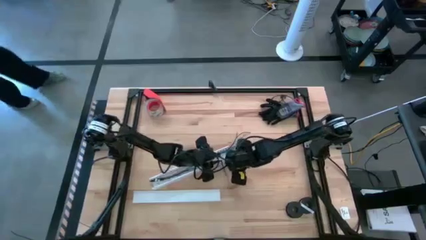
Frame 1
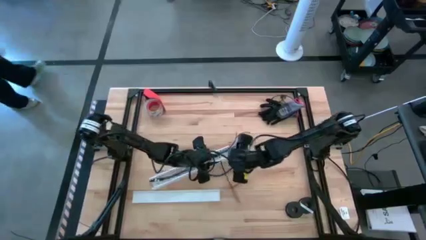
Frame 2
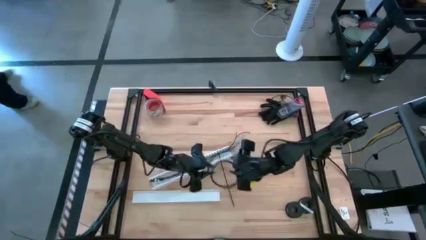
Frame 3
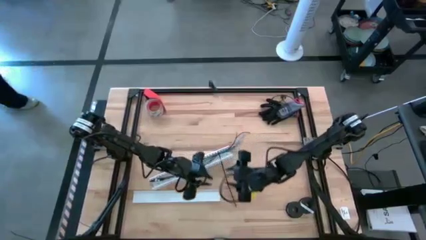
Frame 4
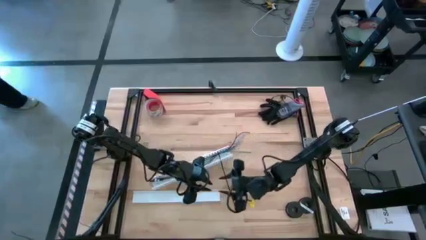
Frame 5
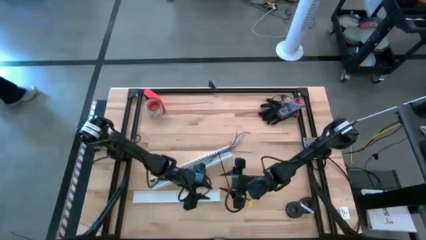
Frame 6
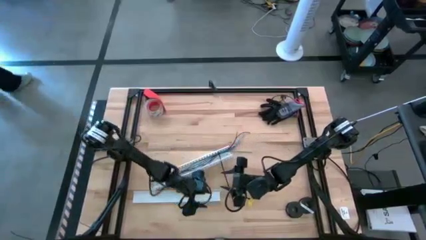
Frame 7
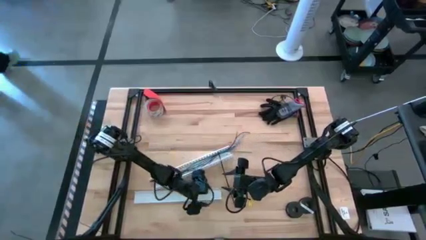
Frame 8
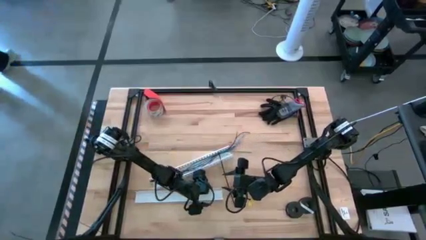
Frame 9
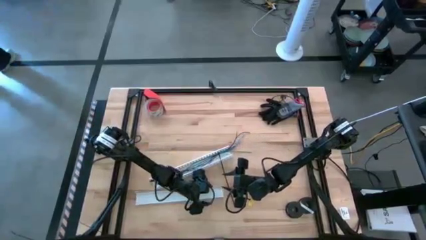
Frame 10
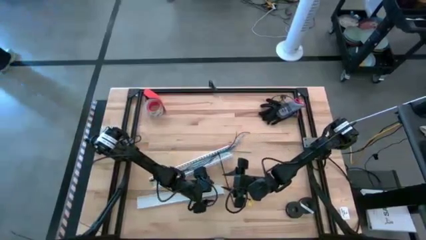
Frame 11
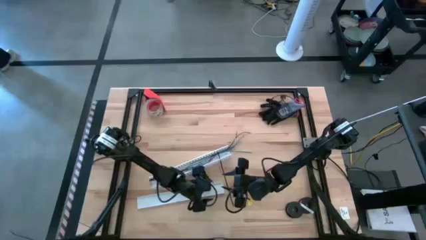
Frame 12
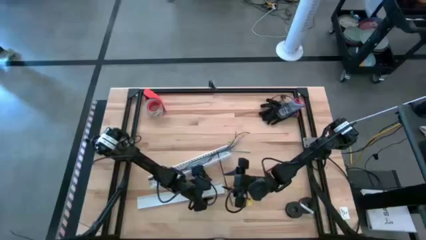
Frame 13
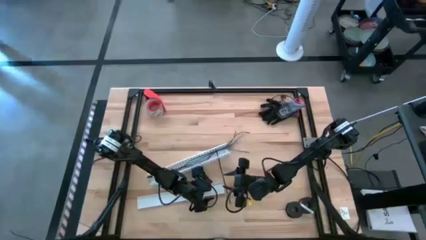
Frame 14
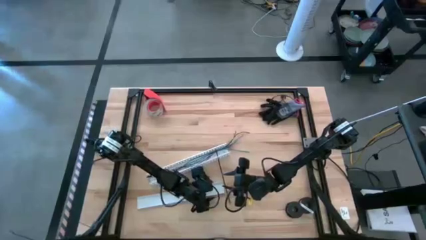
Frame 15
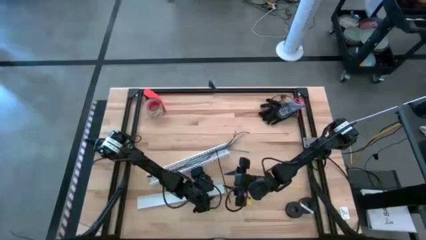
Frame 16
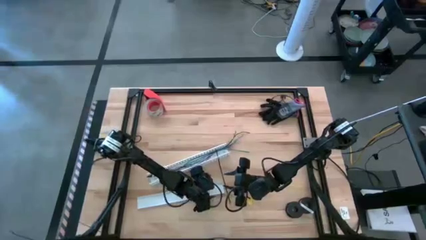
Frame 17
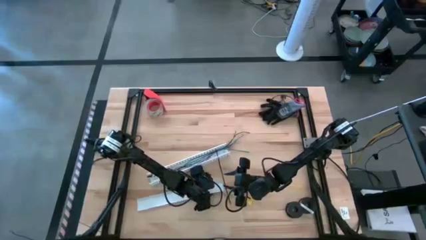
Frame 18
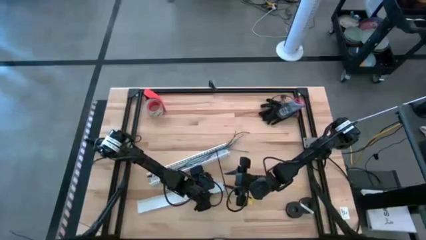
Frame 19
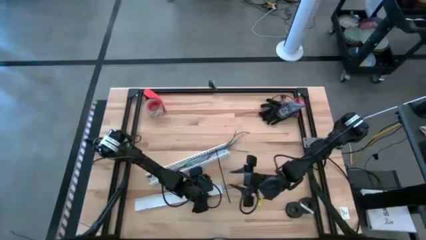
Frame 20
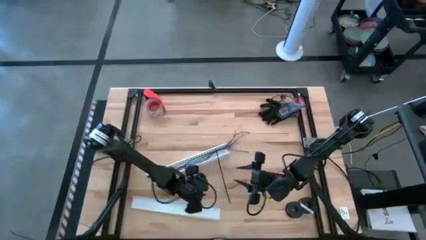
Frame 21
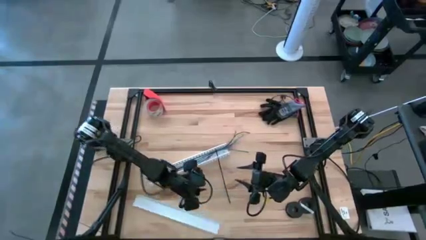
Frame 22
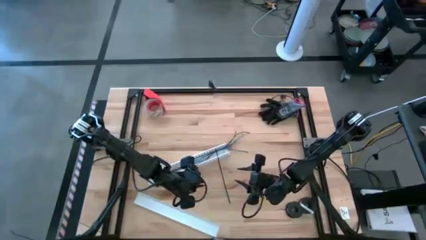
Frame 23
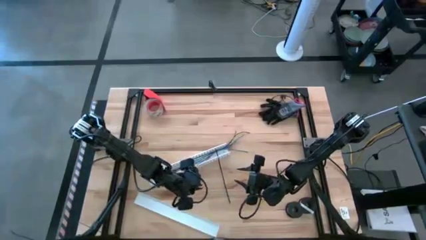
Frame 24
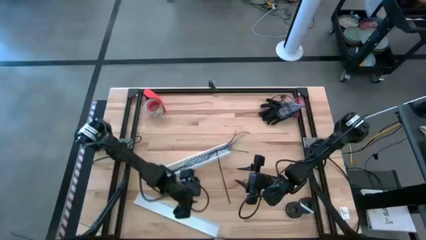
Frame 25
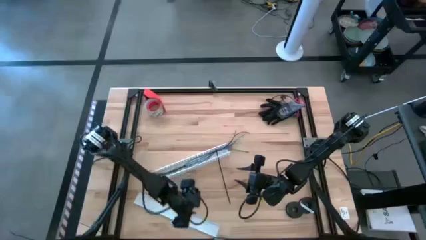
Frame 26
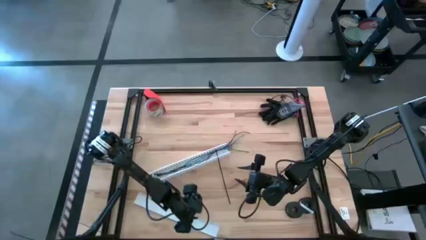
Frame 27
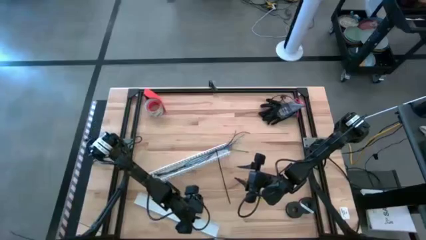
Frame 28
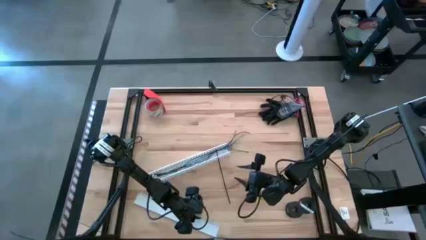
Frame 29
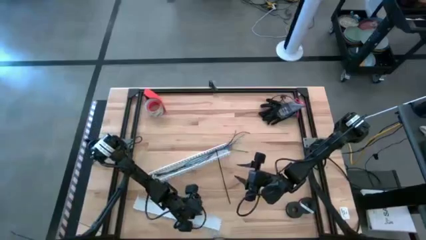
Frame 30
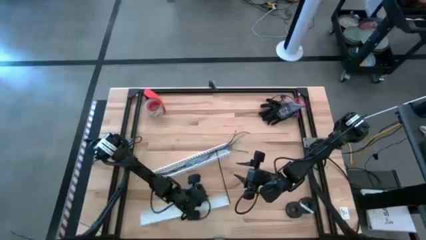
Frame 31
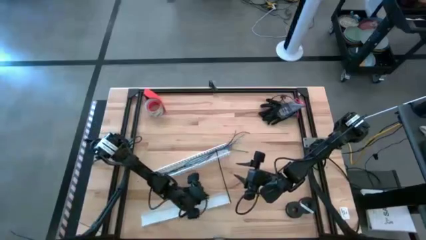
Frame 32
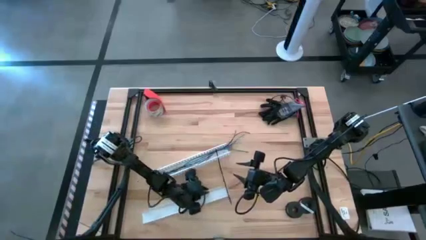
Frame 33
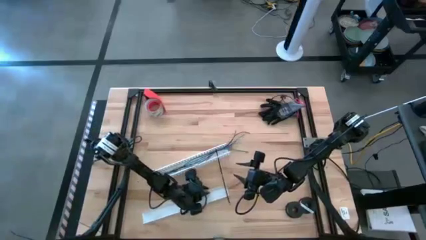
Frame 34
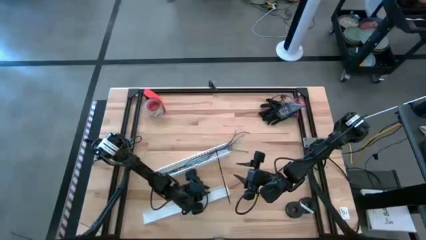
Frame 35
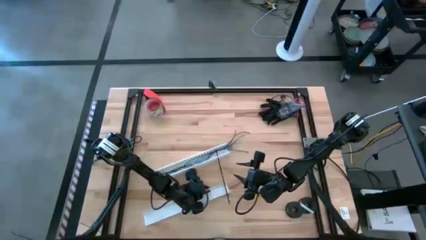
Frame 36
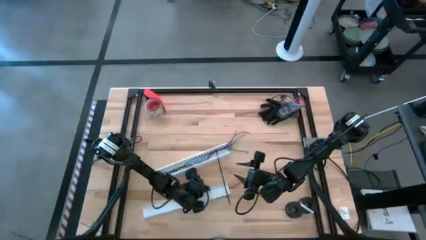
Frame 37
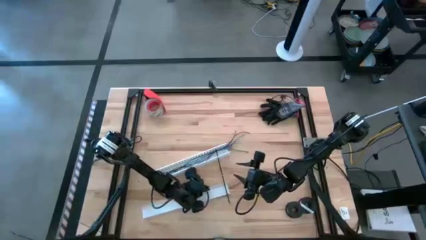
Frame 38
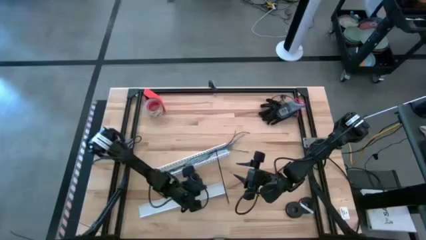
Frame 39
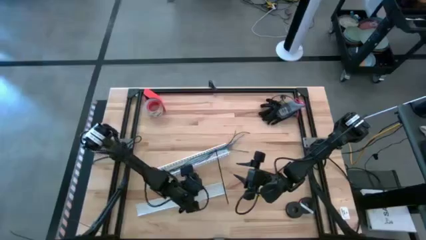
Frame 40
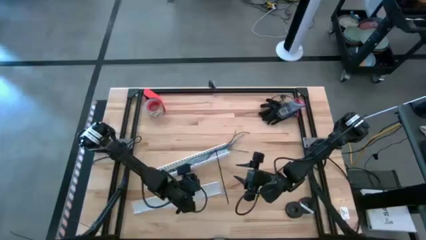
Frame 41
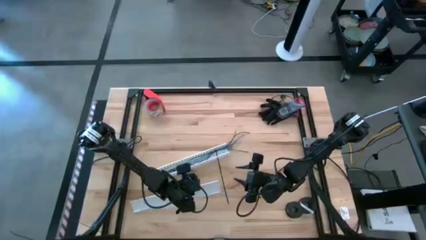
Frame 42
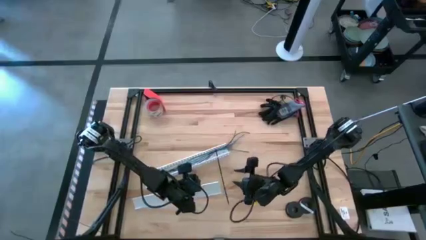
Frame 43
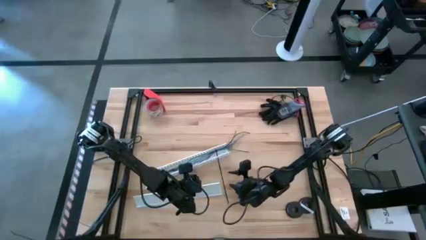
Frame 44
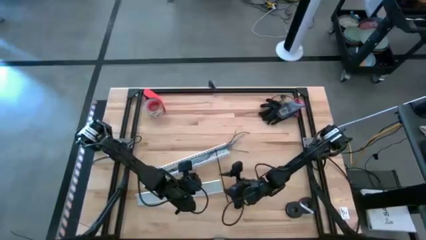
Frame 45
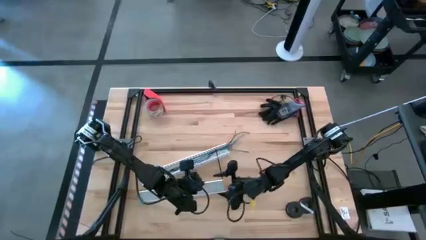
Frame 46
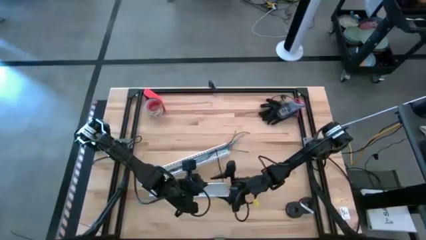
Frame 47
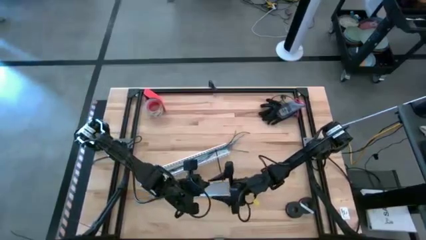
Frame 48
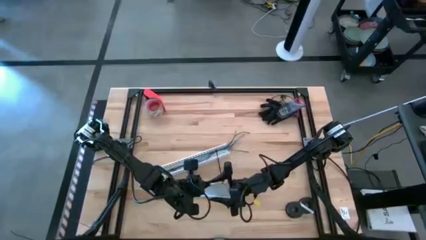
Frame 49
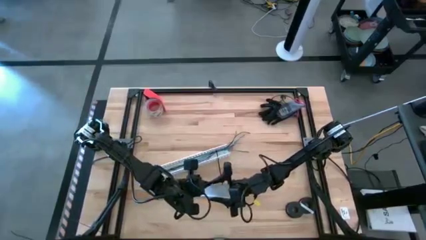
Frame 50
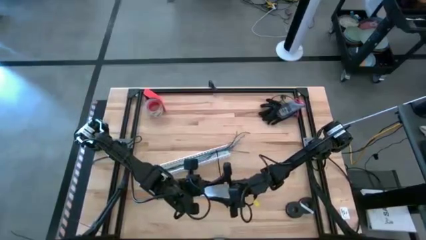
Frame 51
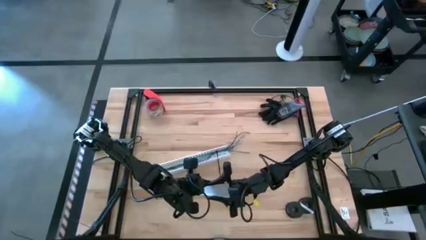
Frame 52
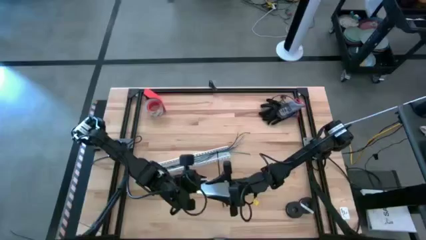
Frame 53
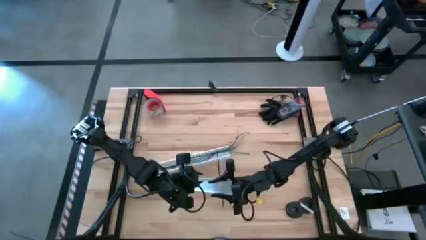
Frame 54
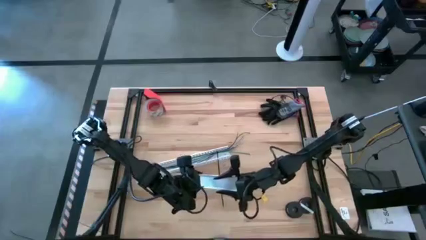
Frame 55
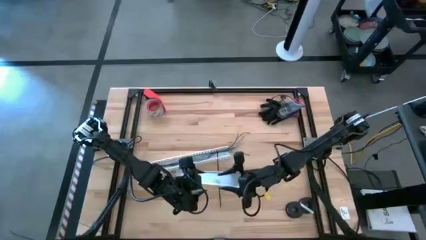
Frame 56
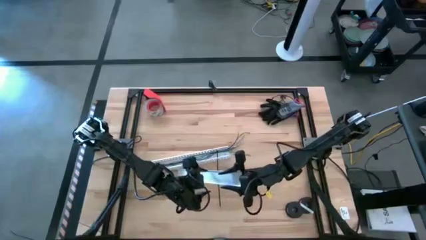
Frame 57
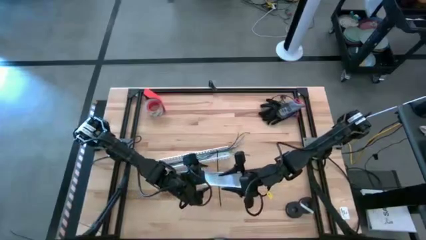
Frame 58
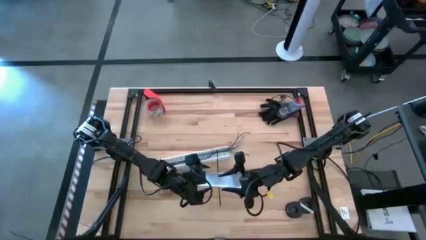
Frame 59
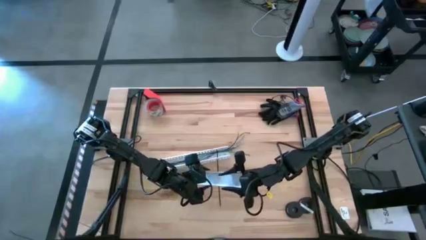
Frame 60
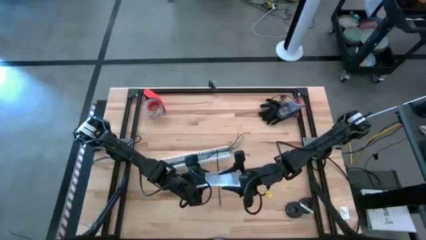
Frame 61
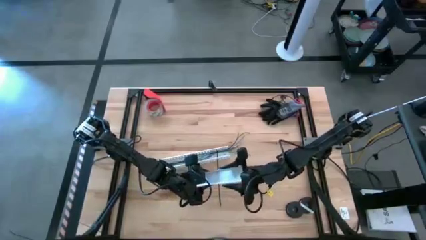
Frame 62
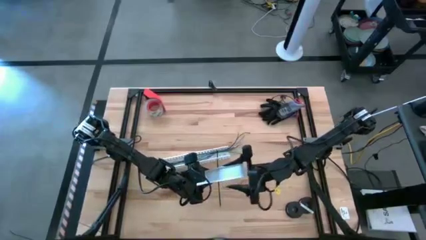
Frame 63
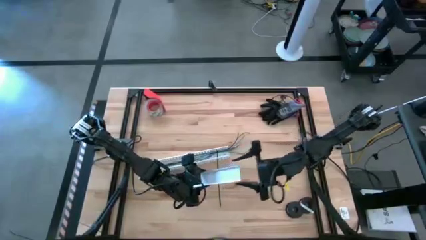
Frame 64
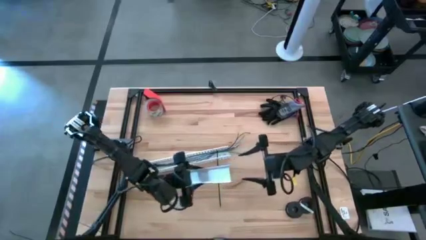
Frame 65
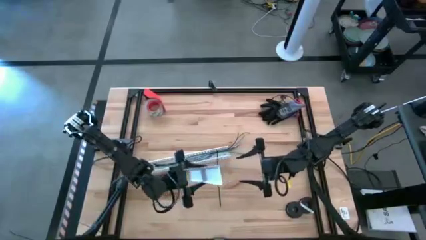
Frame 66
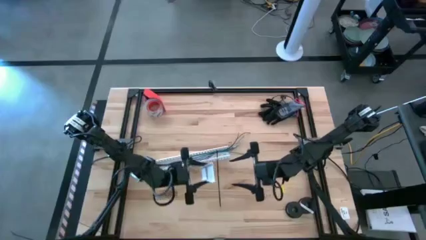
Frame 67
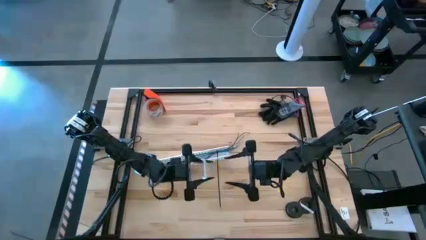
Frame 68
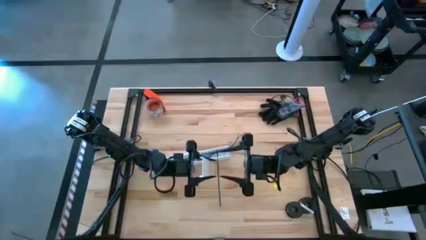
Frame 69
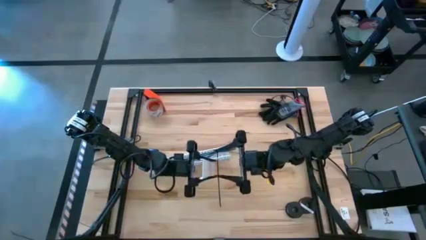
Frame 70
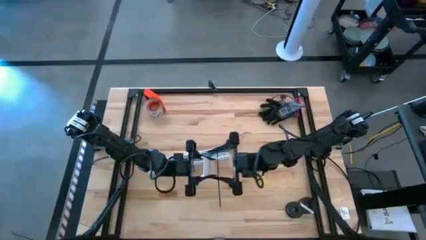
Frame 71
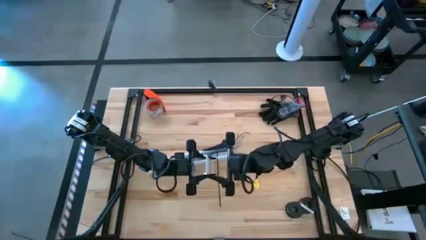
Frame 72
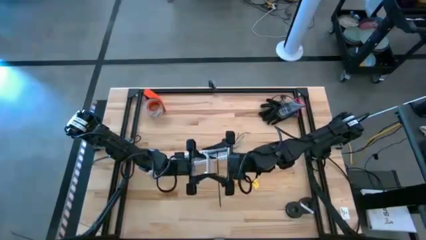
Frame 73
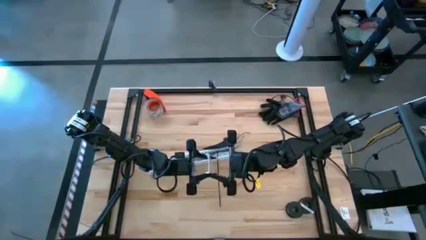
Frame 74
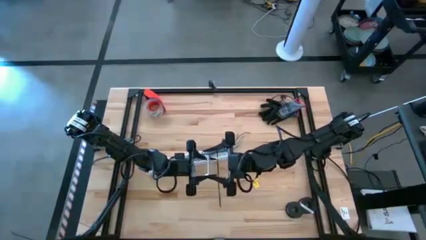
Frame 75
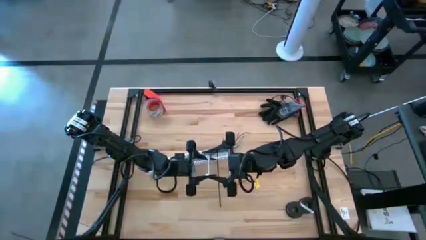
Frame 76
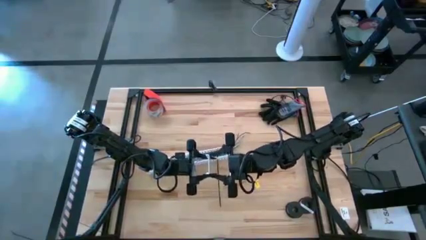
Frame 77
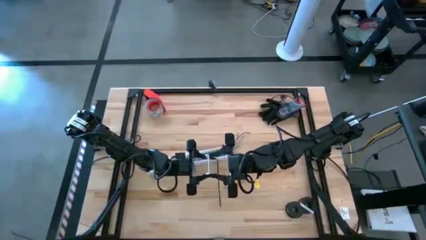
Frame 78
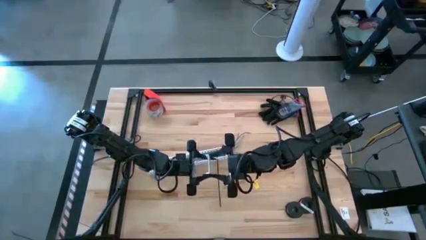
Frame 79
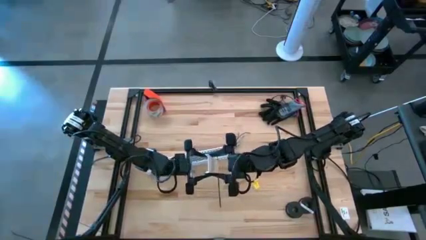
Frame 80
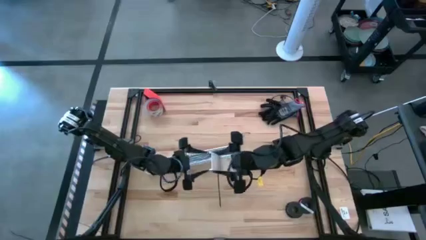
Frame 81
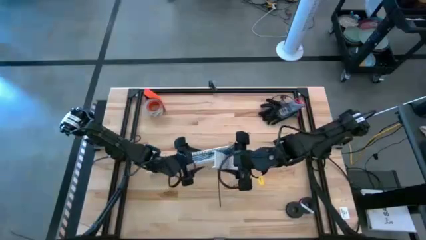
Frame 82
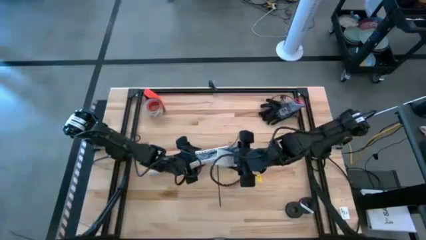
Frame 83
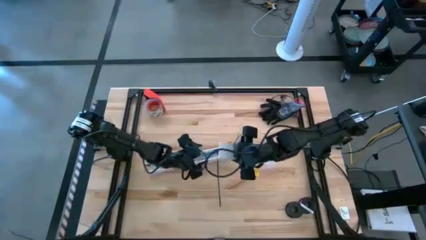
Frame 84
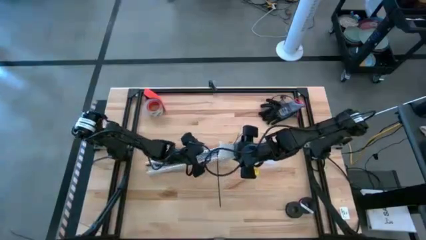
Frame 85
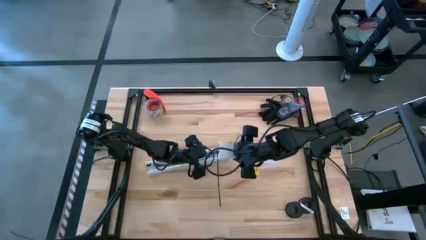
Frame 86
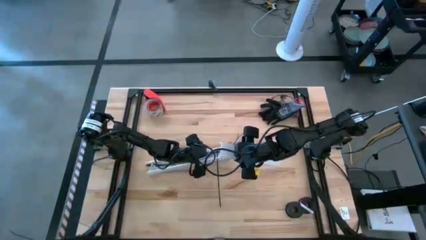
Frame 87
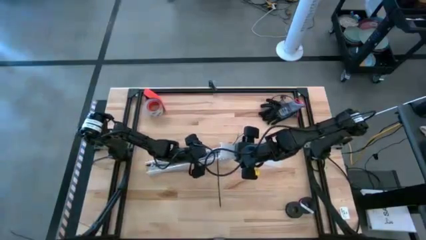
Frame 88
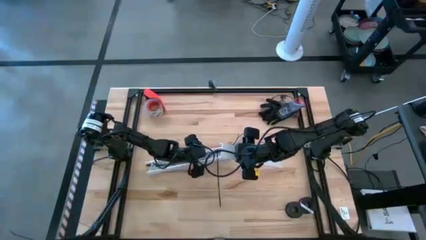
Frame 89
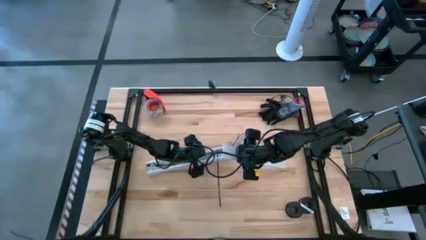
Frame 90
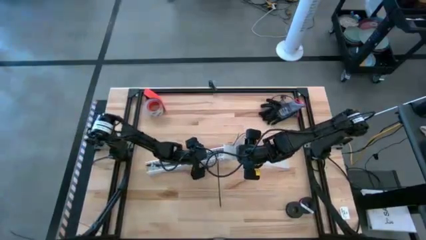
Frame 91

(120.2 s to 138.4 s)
Task: Ziptie cables
Close the cable duct
